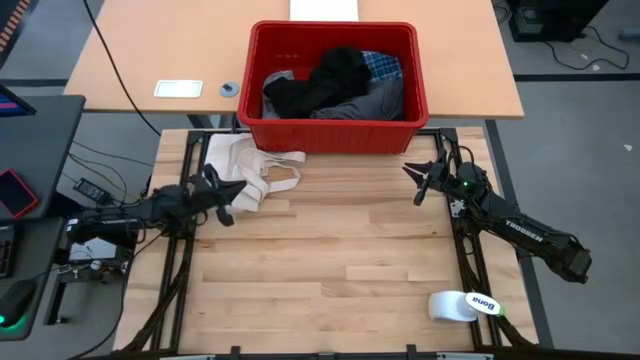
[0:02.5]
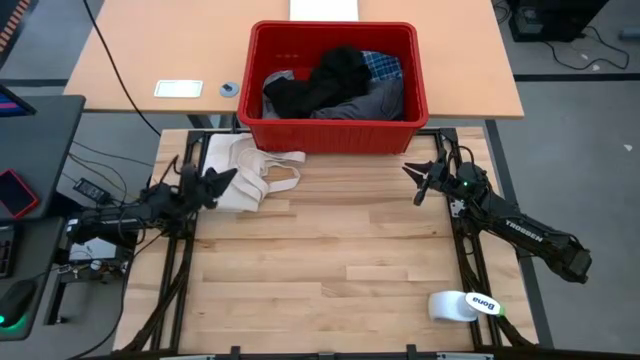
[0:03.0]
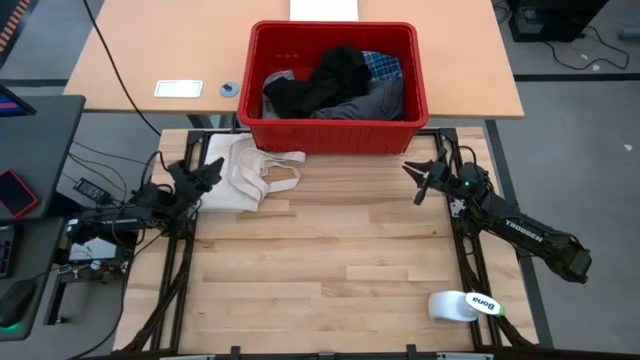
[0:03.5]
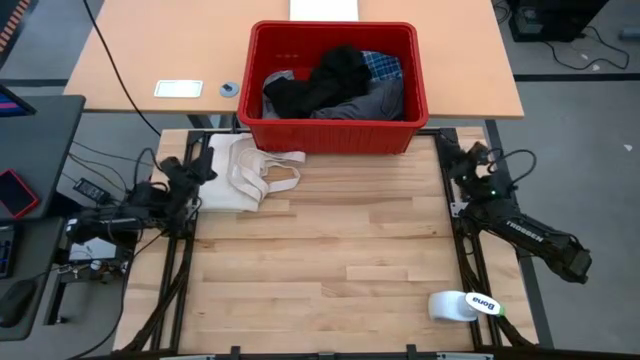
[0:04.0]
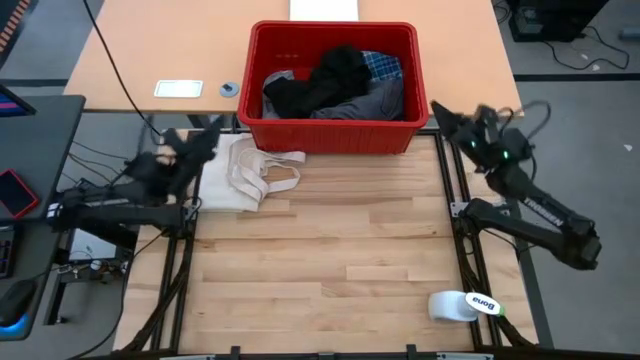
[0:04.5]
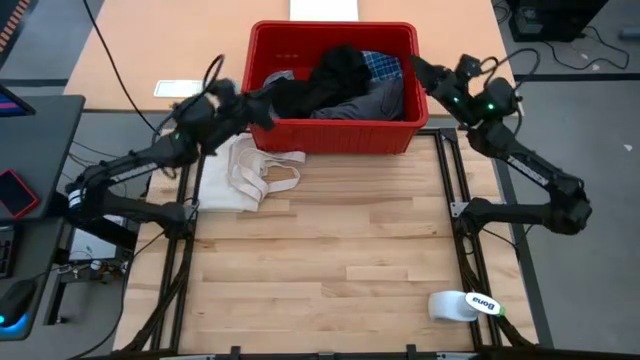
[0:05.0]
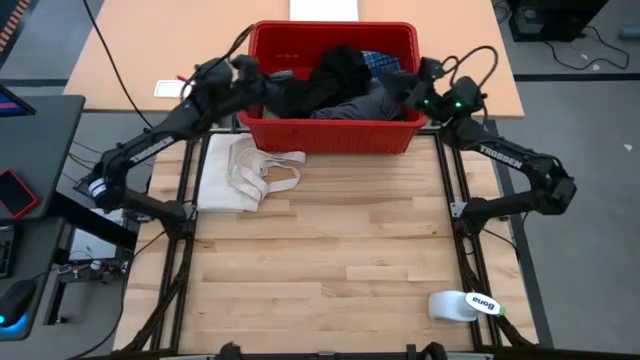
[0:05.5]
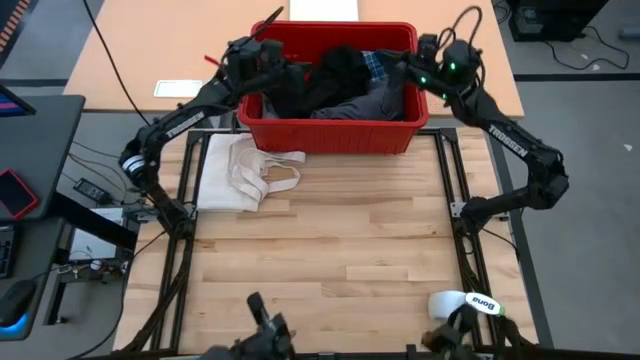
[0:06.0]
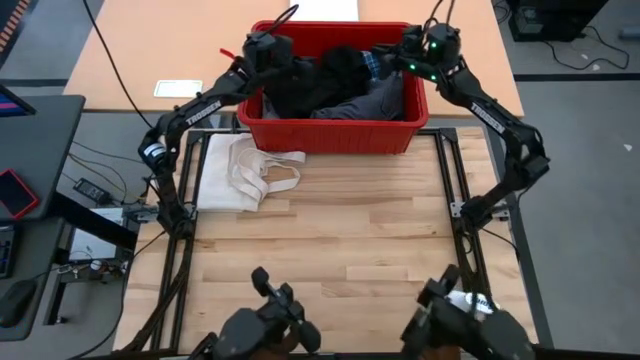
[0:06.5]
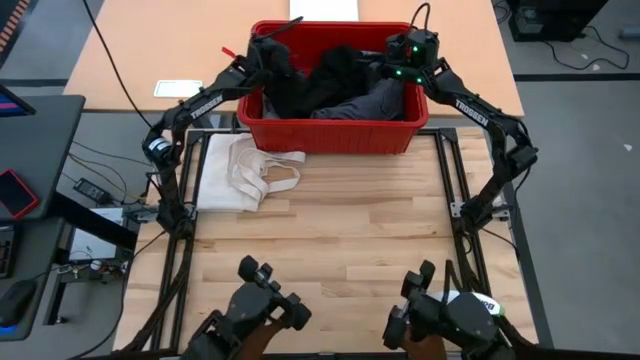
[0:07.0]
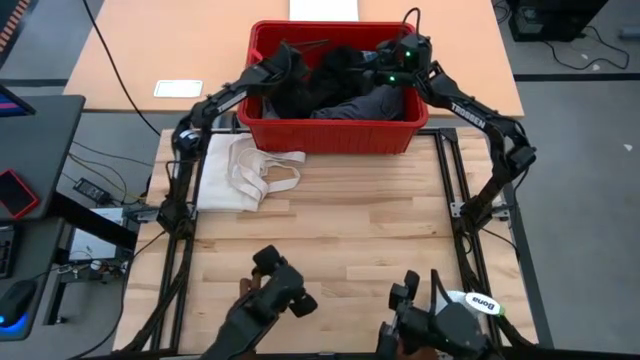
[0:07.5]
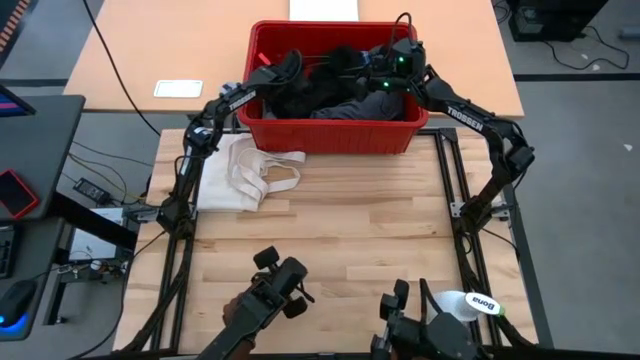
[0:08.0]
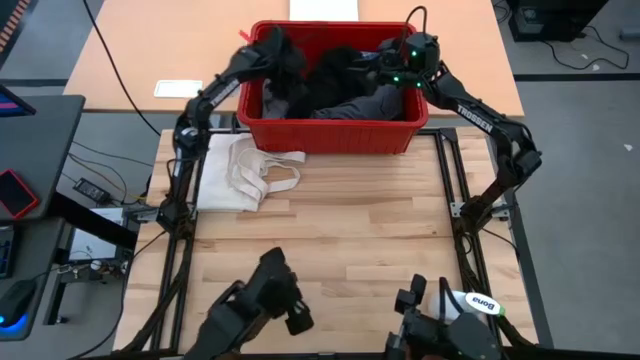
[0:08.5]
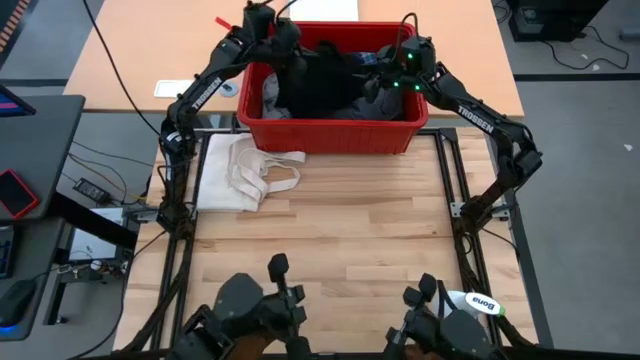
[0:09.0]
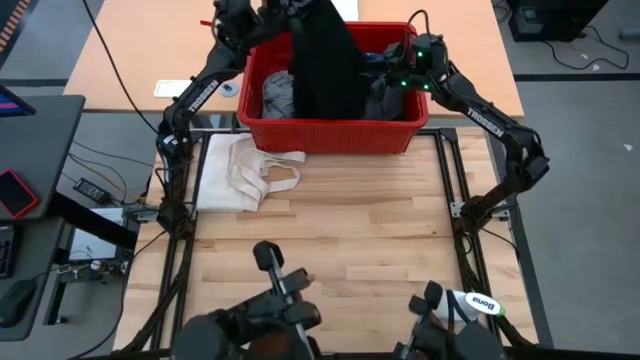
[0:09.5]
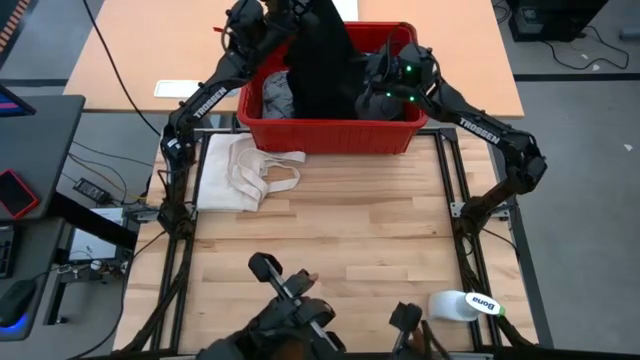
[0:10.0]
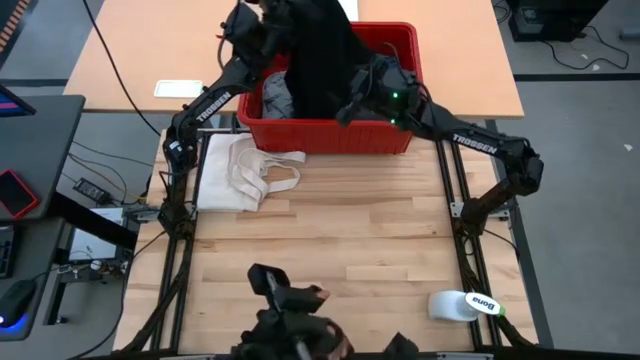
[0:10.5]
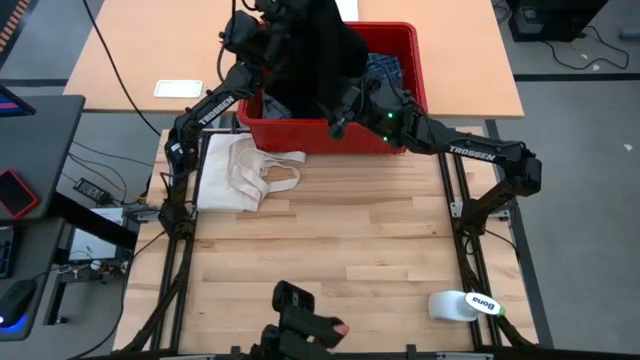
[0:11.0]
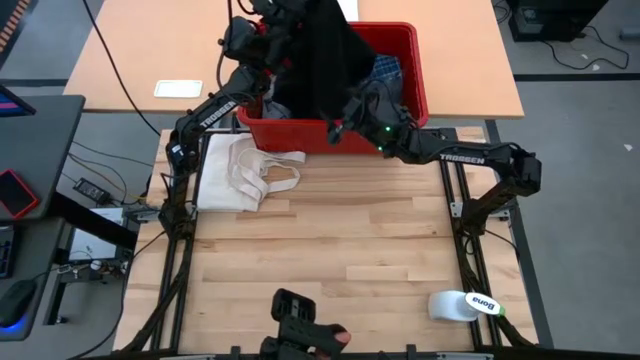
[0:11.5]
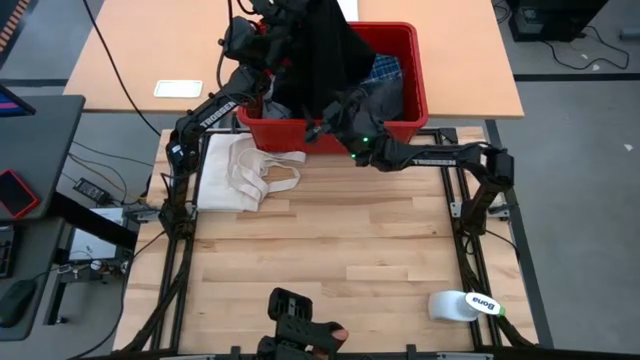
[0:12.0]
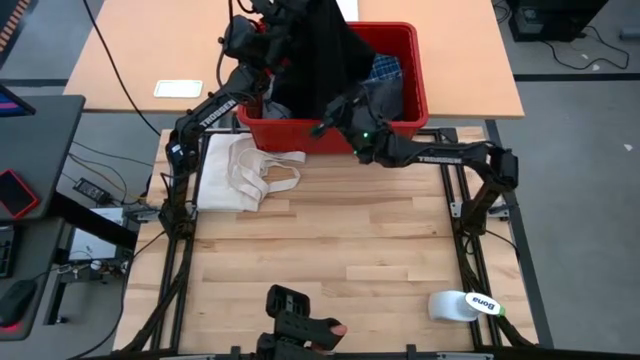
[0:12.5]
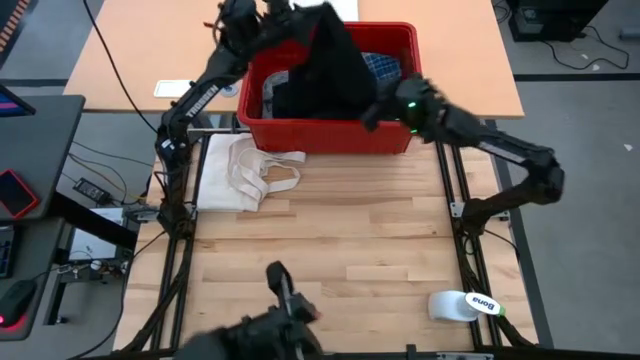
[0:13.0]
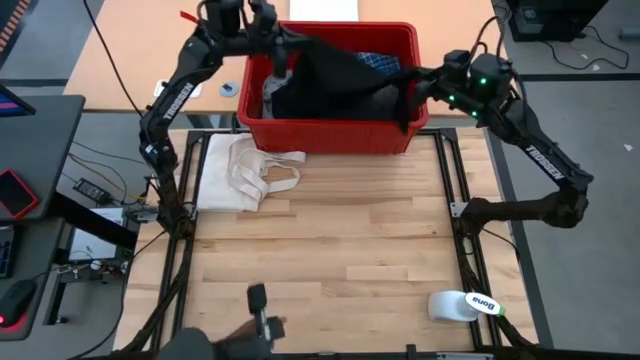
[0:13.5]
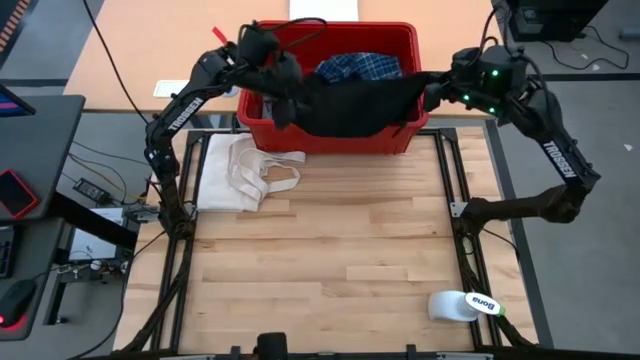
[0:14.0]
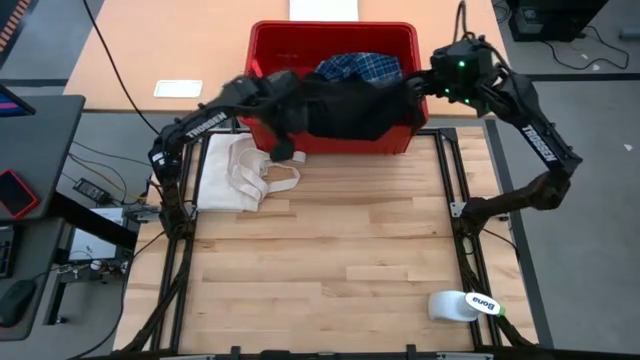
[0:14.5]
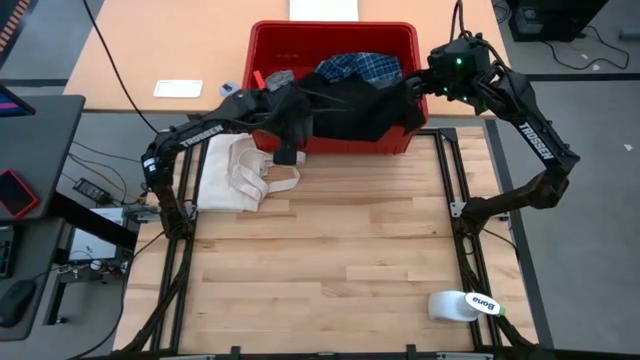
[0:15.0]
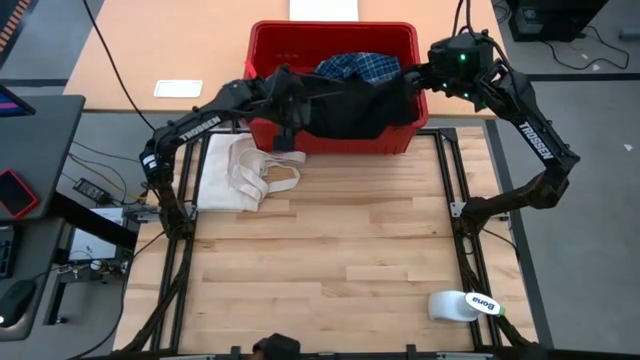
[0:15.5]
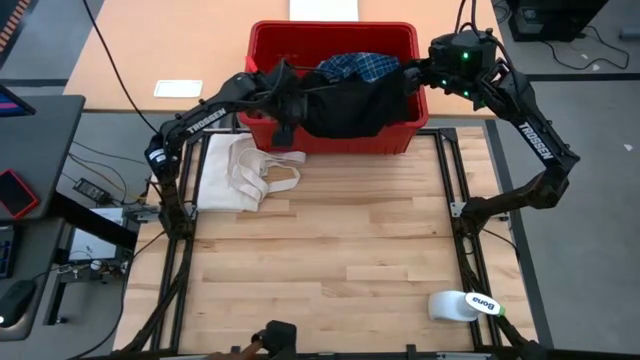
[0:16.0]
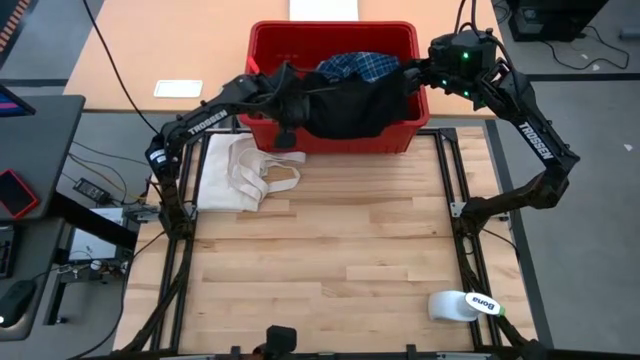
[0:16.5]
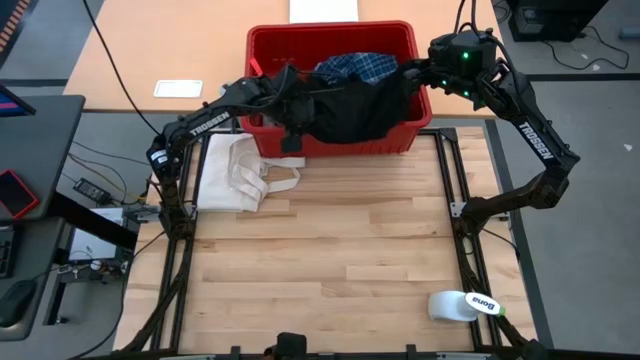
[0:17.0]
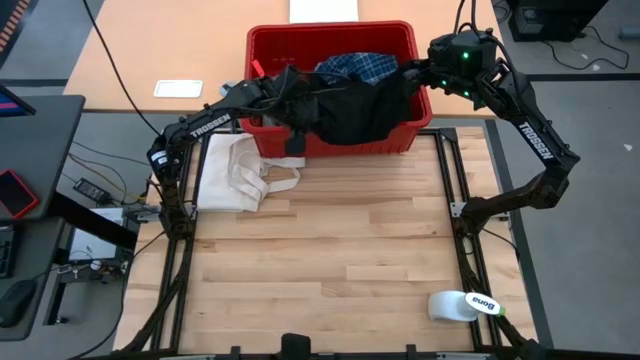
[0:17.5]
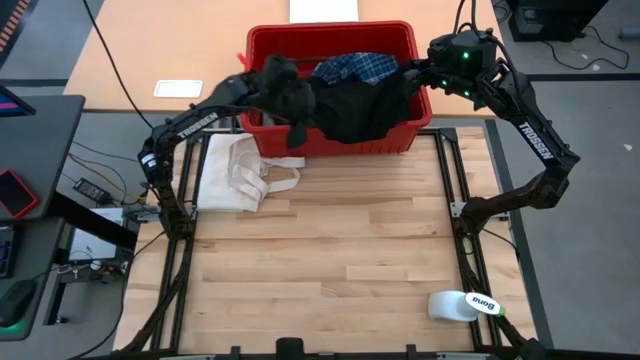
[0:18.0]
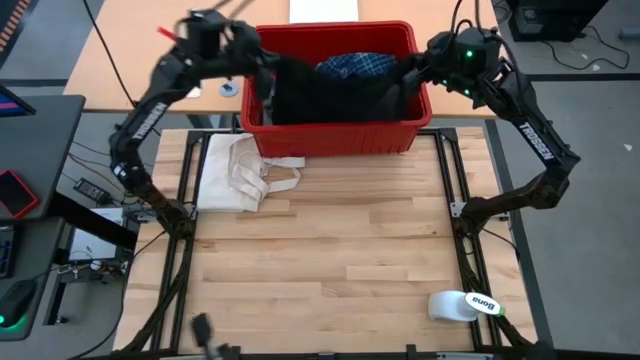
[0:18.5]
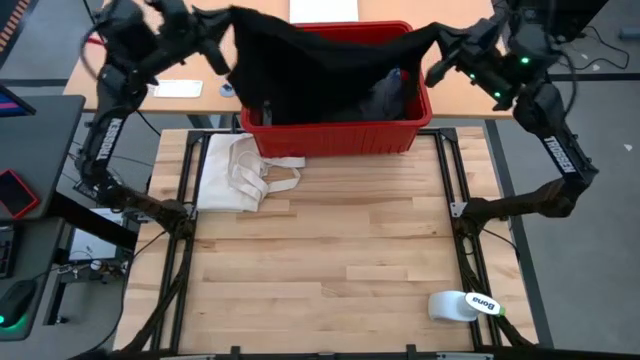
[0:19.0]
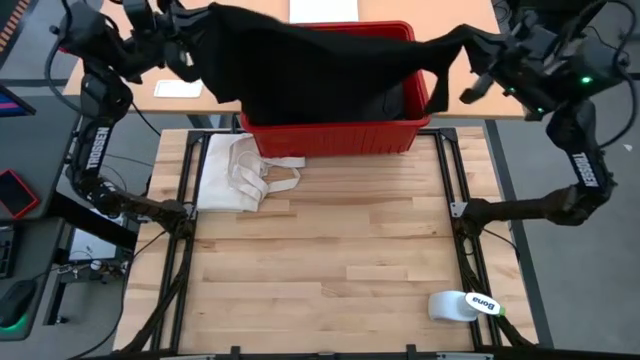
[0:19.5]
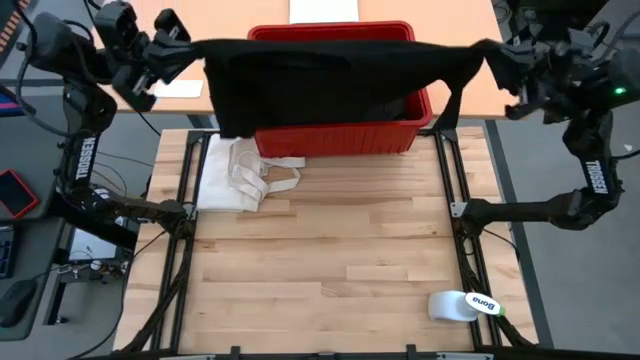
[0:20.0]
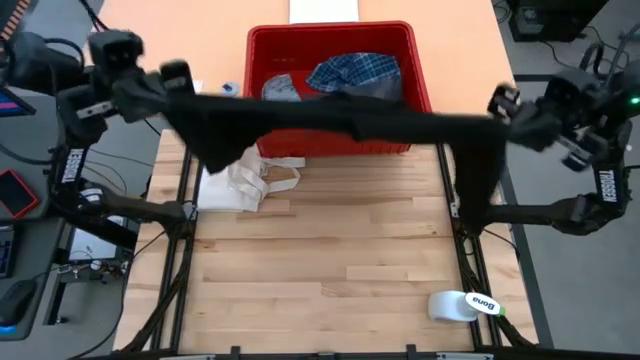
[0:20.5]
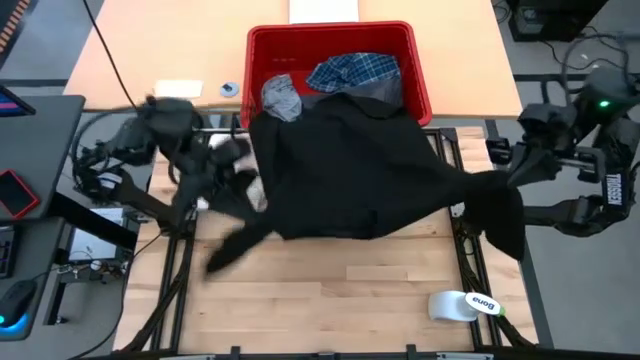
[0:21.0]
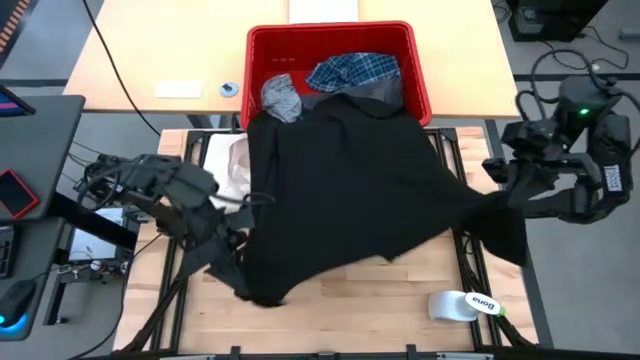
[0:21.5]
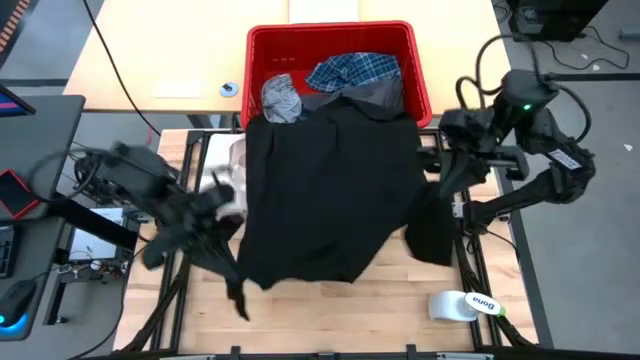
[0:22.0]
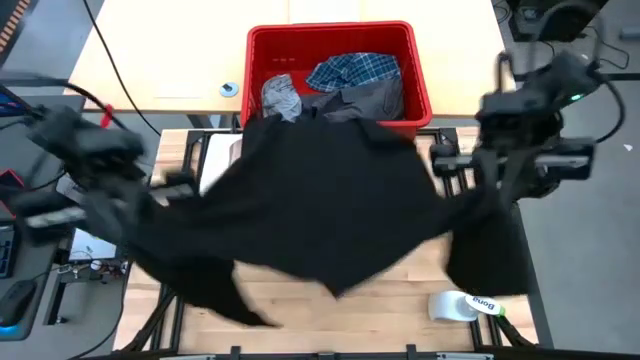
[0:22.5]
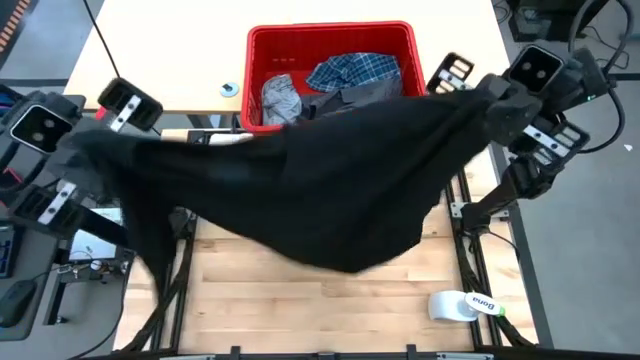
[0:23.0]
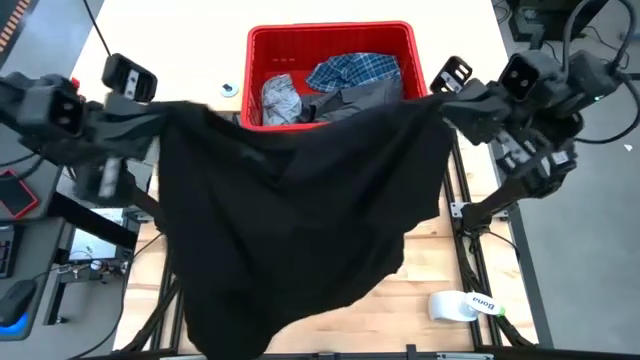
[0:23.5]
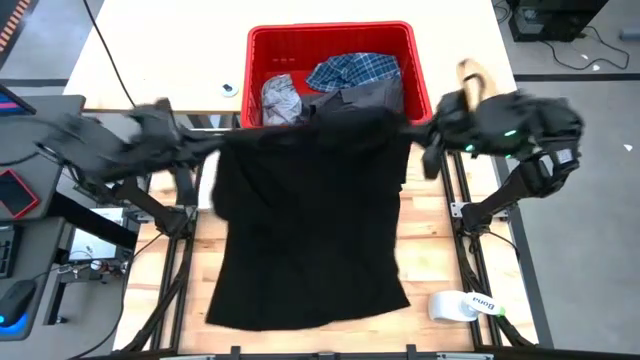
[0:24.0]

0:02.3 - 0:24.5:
Task: Fold Laundry from Bin
Fold the black shirt
